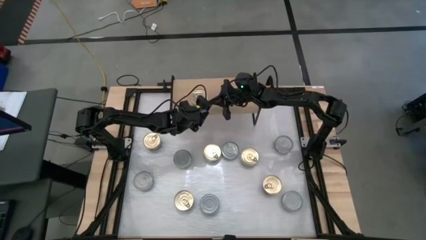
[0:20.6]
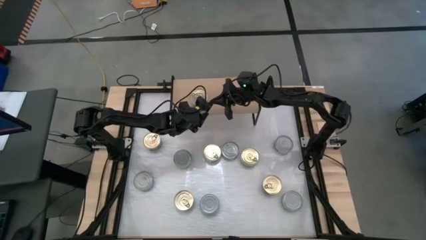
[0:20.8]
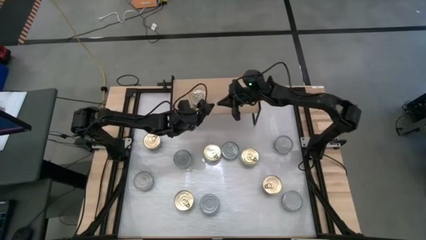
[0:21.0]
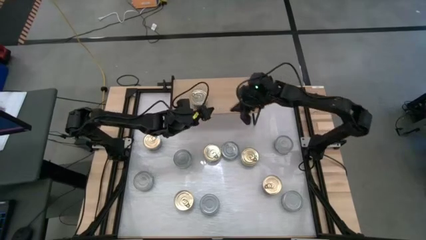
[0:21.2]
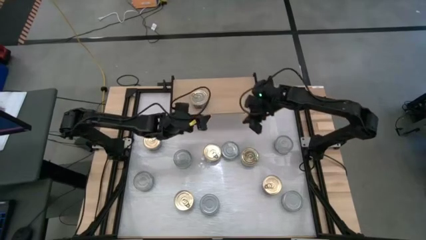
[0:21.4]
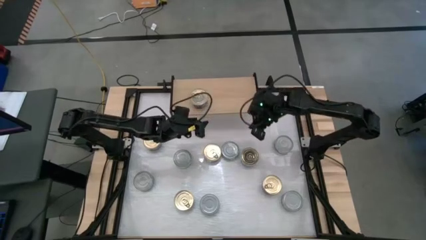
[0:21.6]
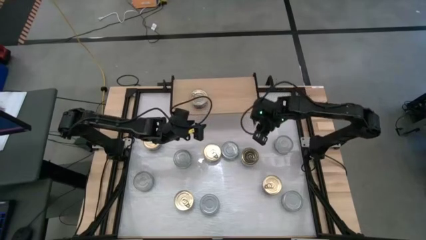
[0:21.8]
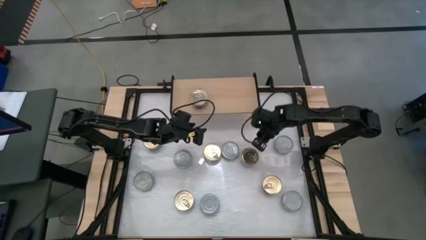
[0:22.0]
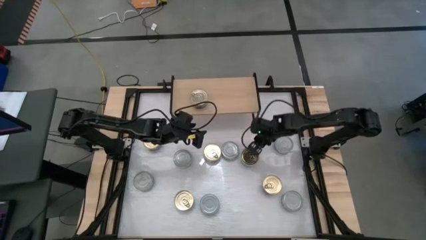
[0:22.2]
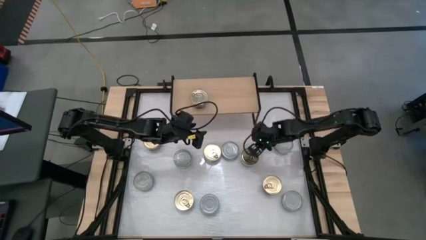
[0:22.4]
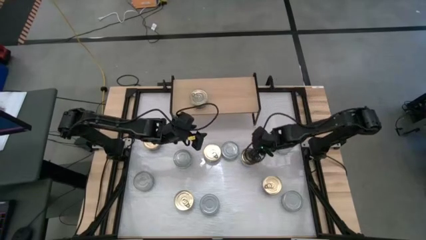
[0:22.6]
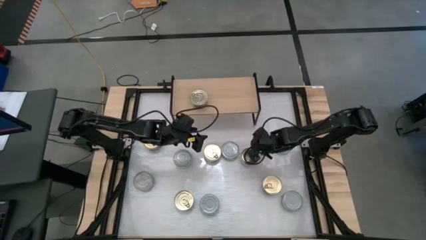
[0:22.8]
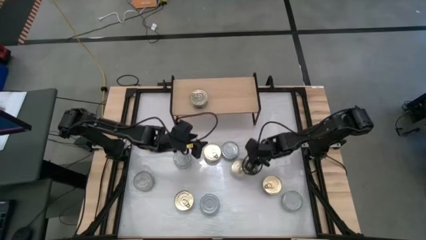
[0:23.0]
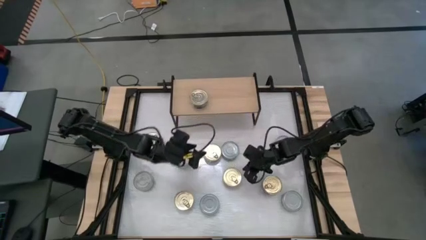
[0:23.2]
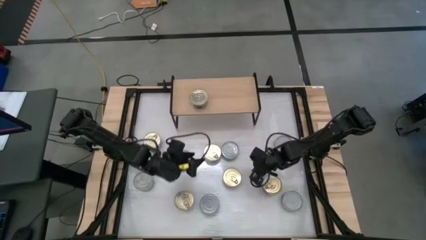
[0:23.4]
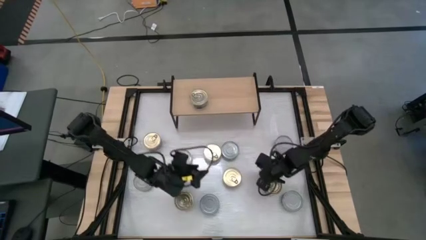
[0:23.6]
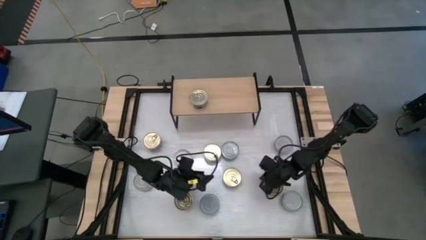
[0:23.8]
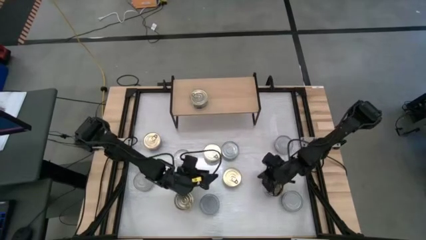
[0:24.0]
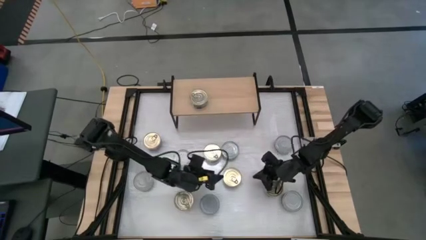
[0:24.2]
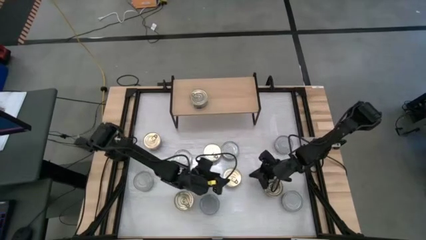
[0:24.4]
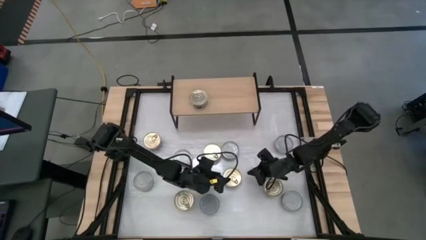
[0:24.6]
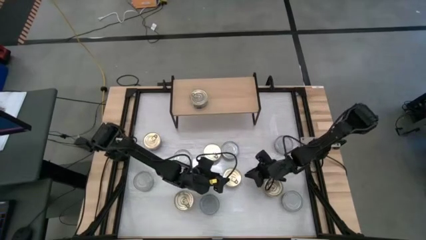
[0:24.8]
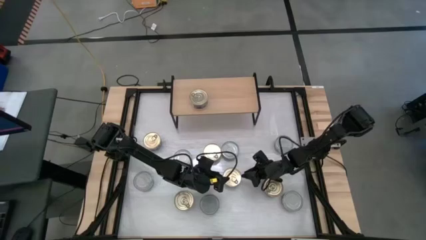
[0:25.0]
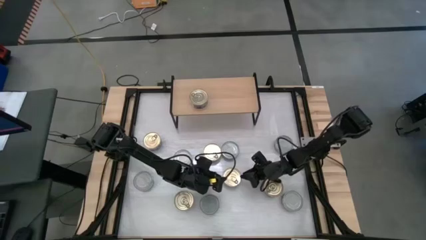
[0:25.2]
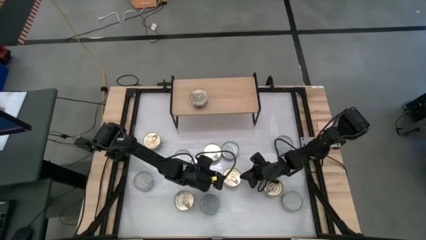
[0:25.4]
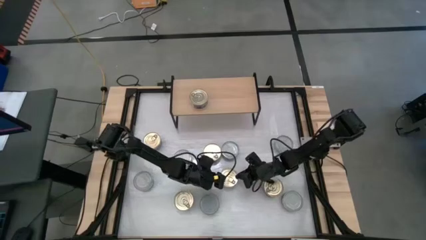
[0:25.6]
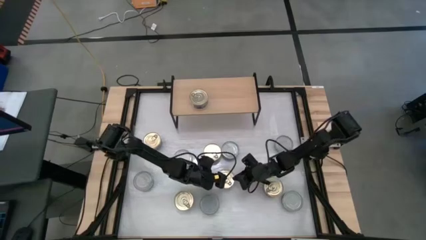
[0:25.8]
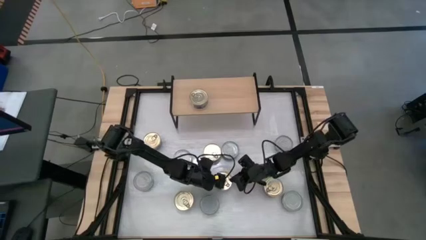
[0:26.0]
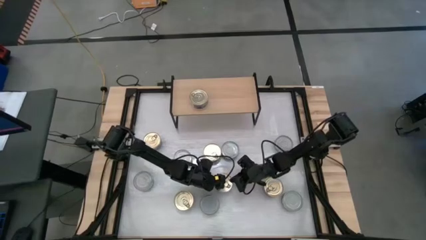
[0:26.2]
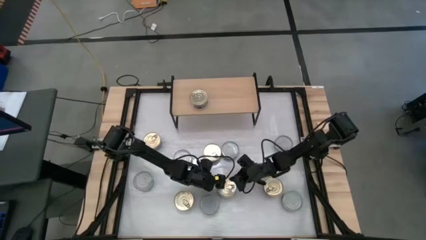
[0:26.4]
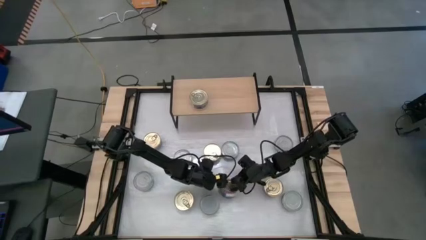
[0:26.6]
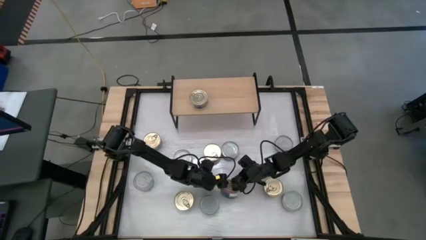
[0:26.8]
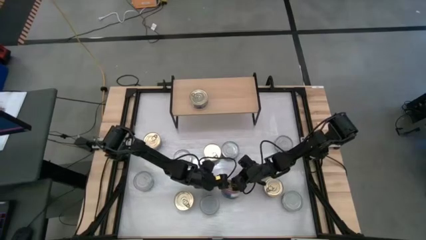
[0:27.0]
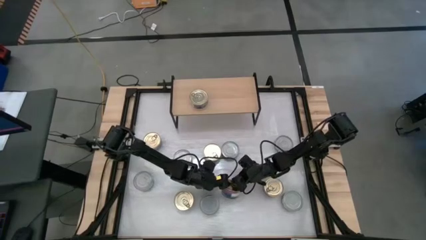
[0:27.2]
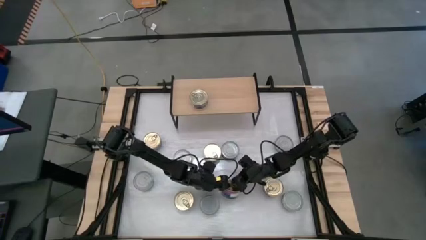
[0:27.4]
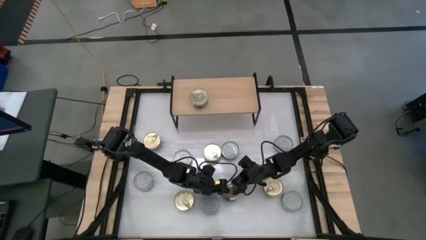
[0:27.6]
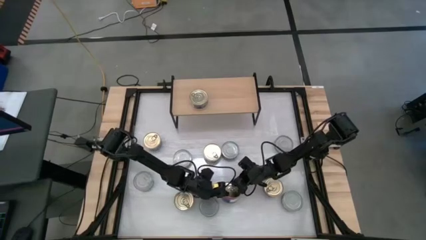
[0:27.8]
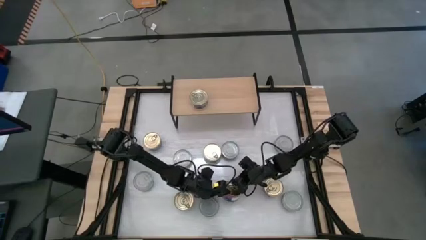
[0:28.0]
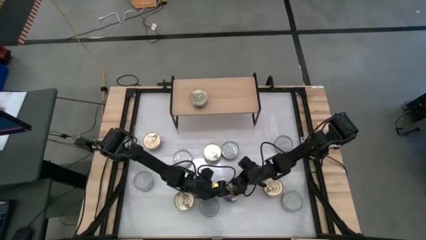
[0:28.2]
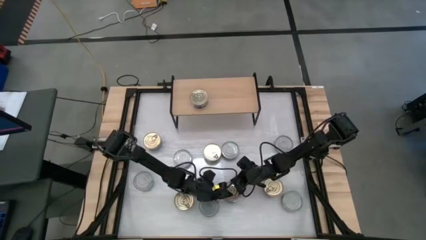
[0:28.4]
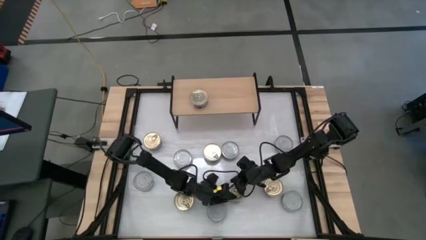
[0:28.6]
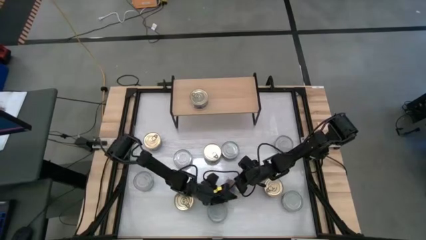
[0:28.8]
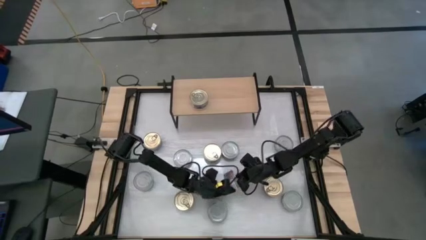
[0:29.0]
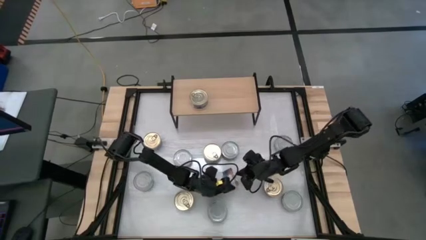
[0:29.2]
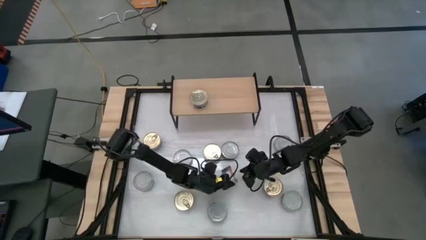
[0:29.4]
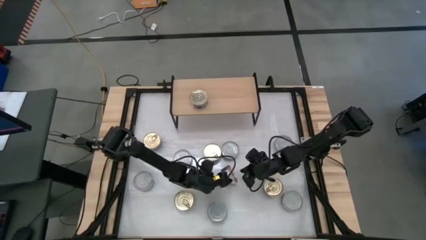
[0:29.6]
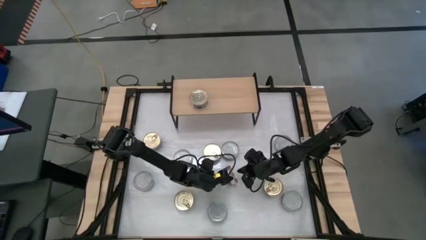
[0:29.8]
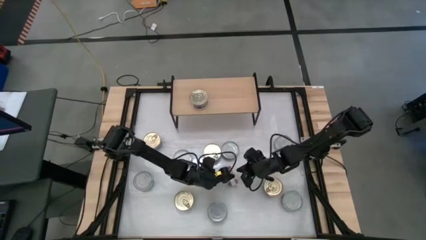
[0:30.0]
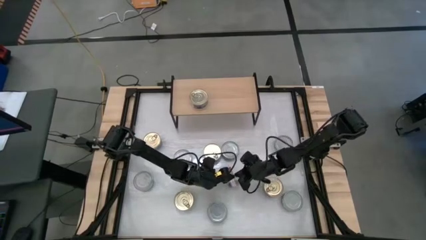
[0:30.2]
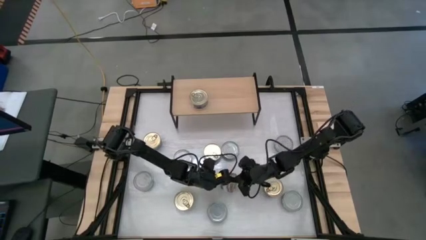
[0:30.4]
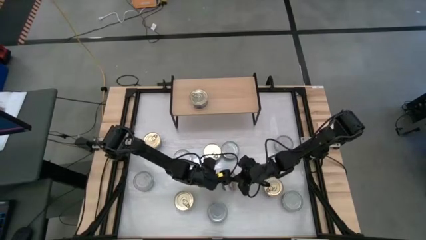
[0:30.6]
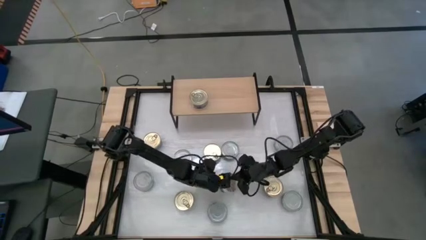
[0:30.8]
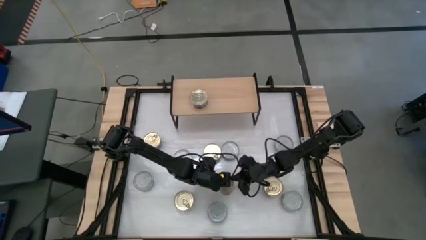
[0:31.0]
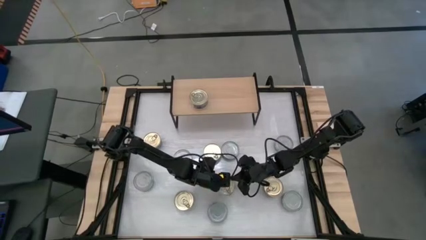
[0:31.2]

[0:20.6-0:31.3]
Task: Stack canned seafood by type on shelf
Stack the blue and pink tuna can on top of the other blue and pink tuna can on the shelf
